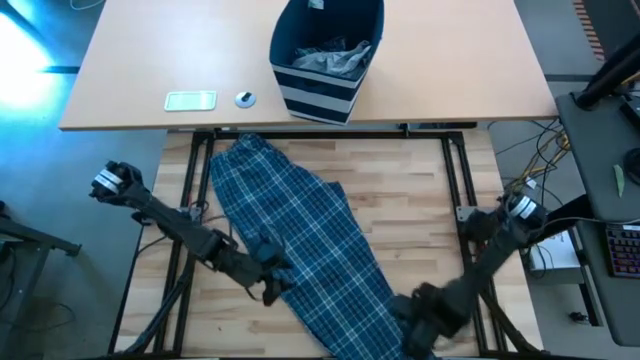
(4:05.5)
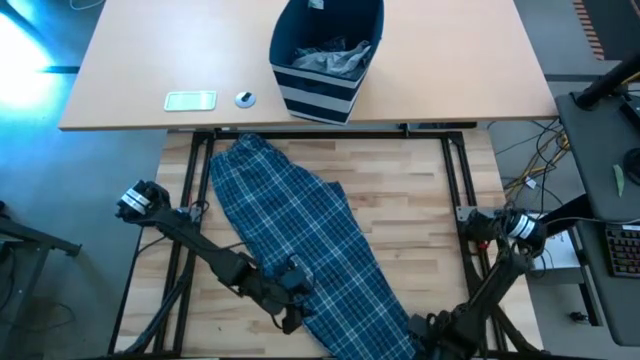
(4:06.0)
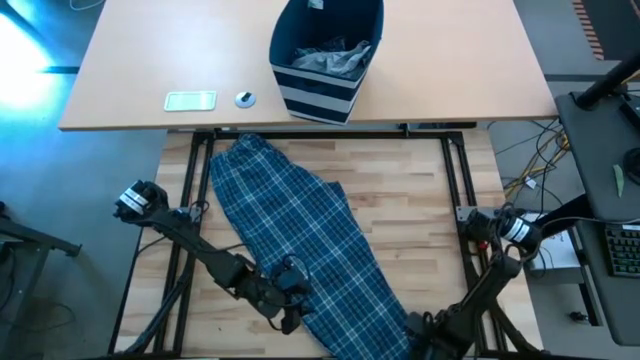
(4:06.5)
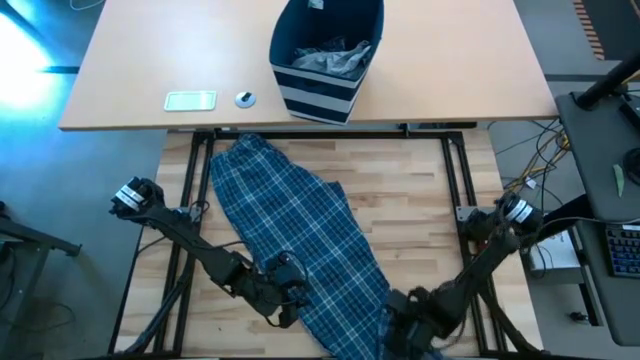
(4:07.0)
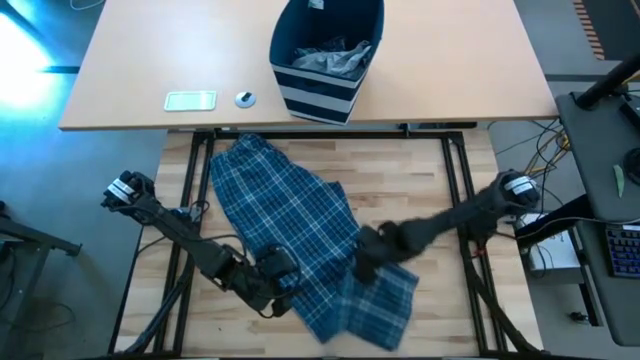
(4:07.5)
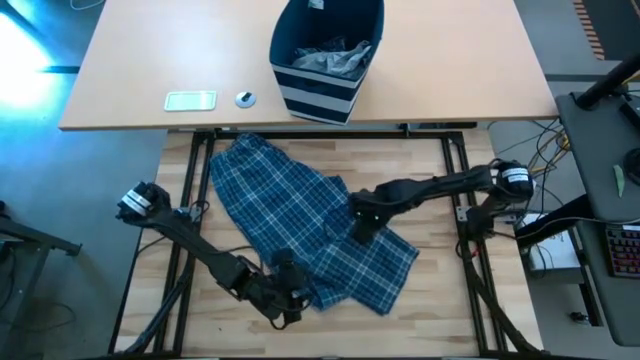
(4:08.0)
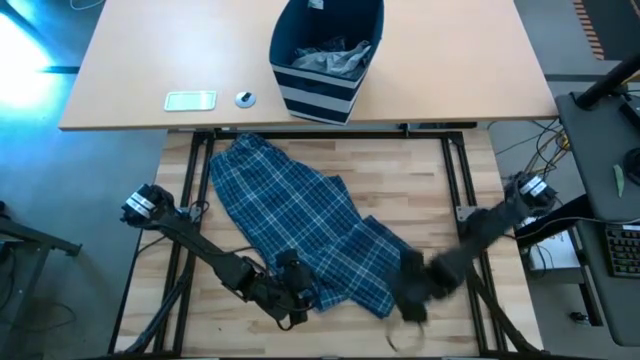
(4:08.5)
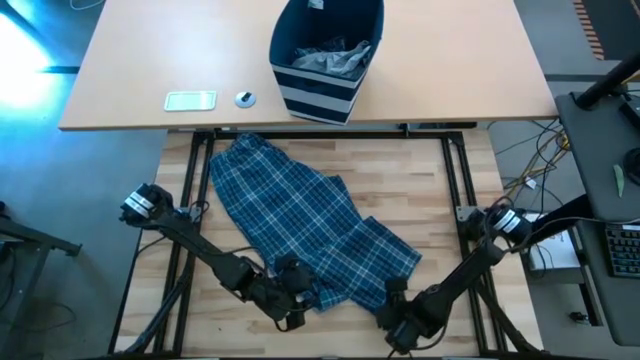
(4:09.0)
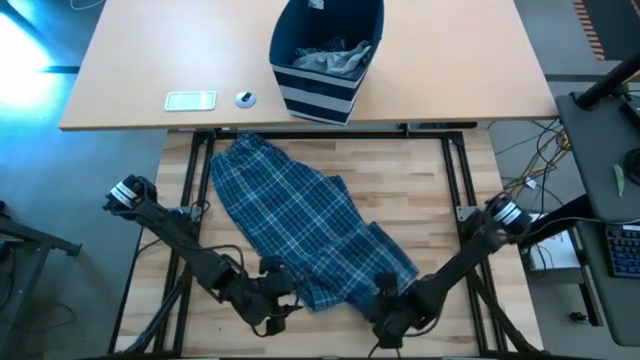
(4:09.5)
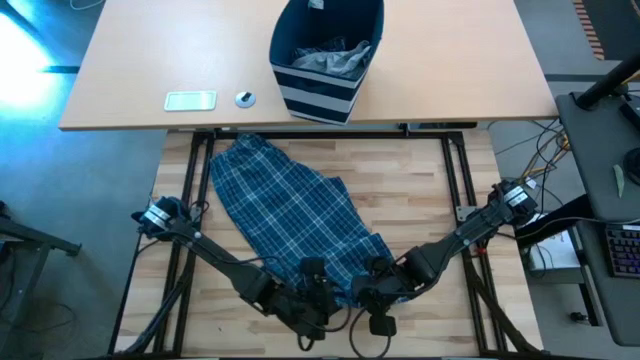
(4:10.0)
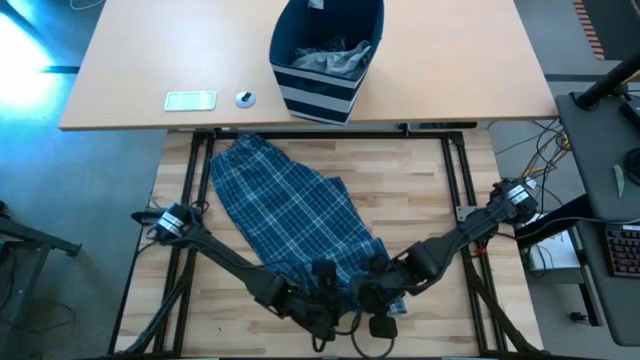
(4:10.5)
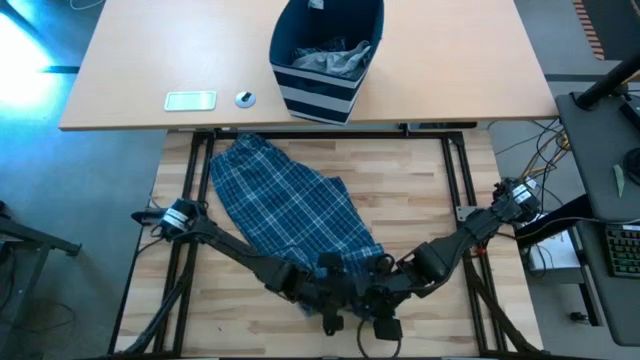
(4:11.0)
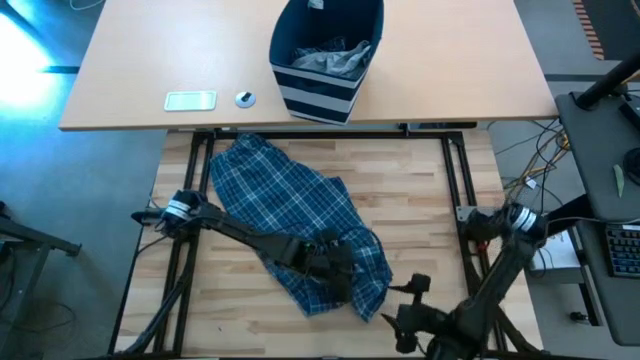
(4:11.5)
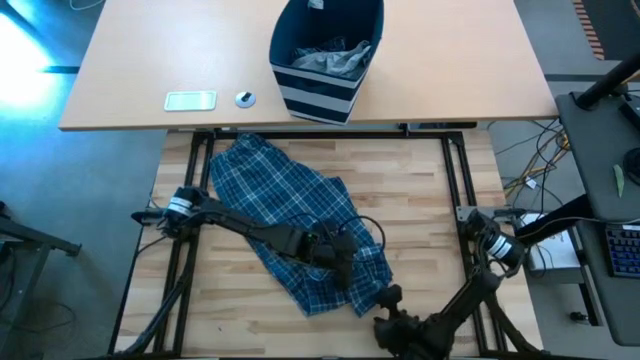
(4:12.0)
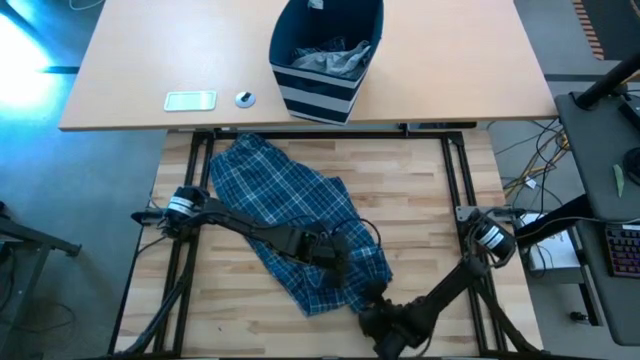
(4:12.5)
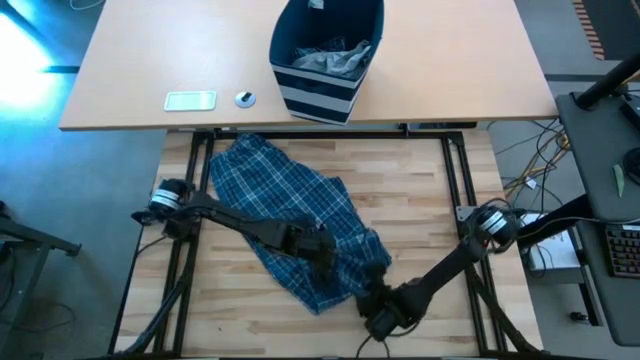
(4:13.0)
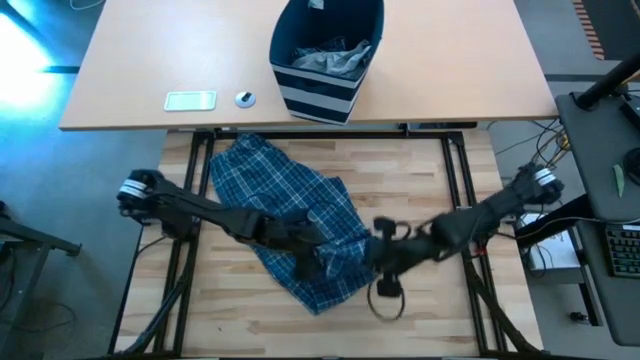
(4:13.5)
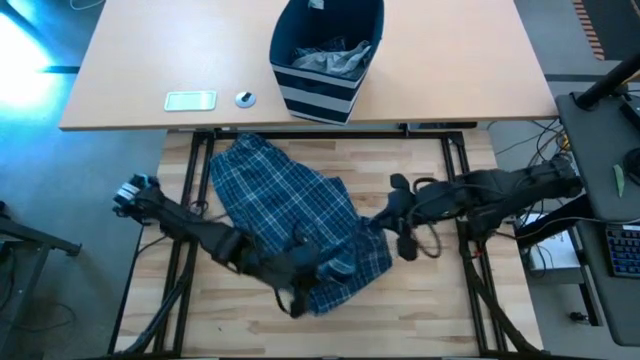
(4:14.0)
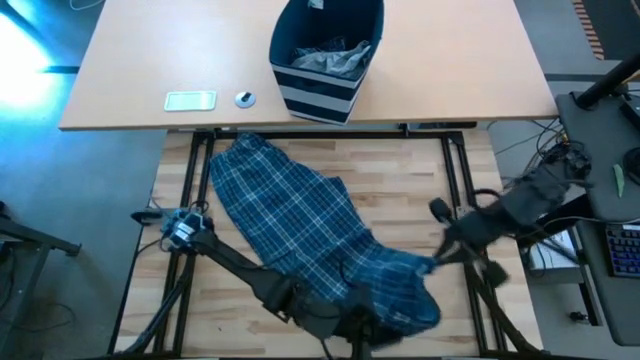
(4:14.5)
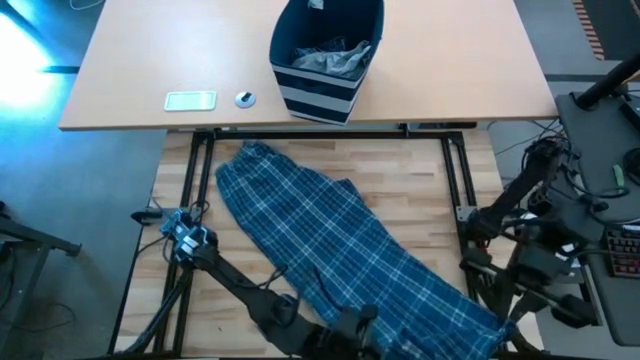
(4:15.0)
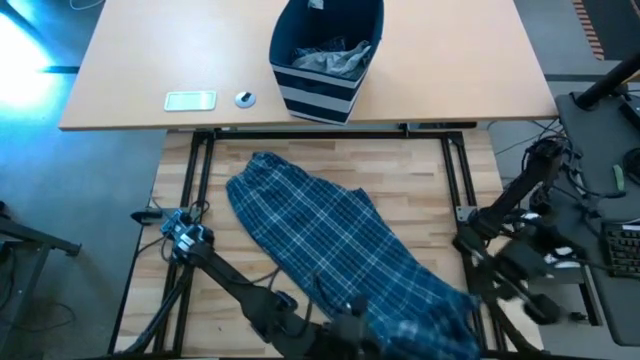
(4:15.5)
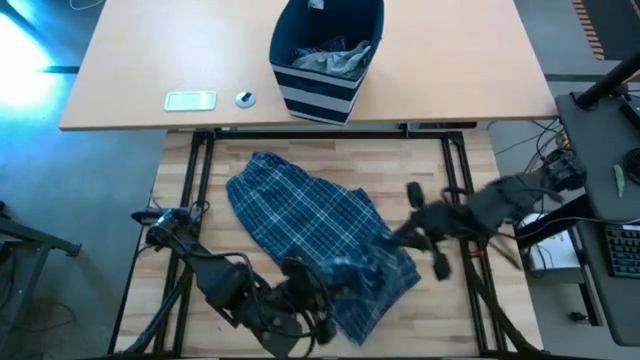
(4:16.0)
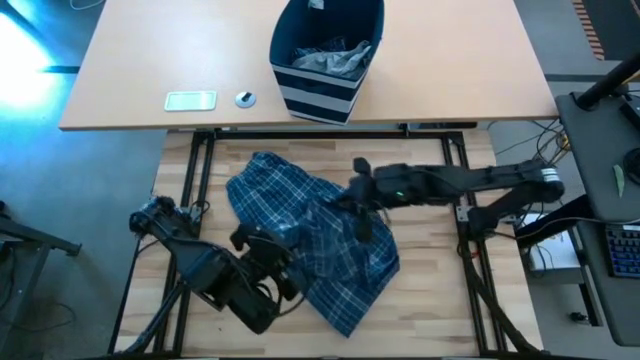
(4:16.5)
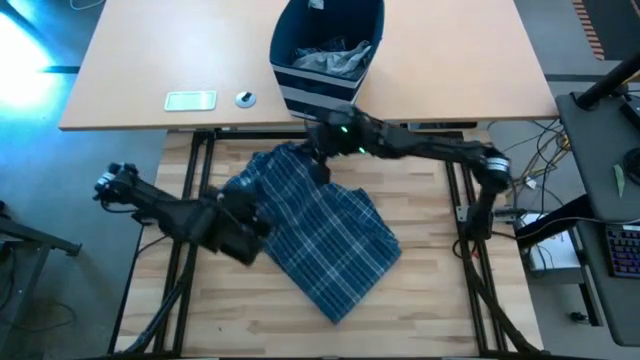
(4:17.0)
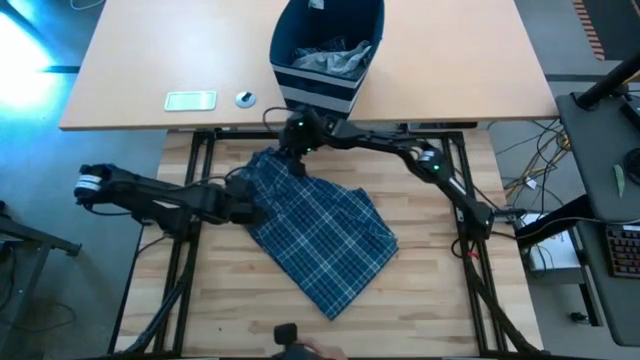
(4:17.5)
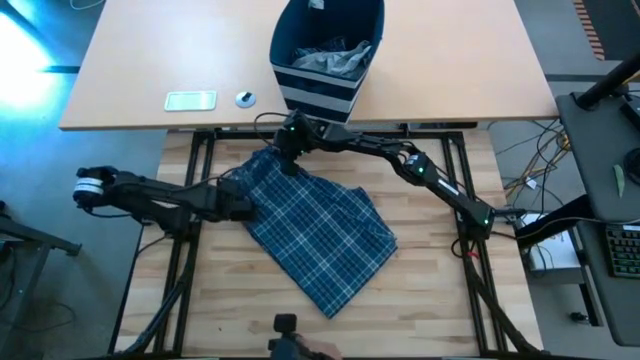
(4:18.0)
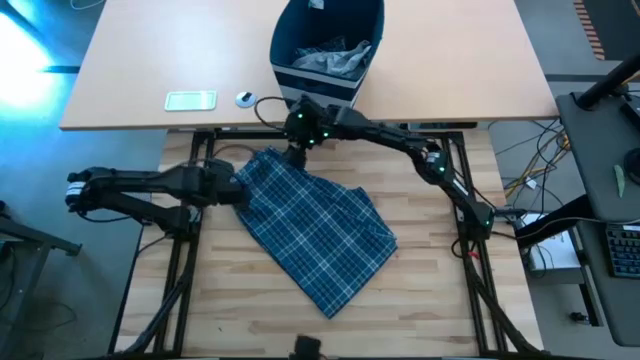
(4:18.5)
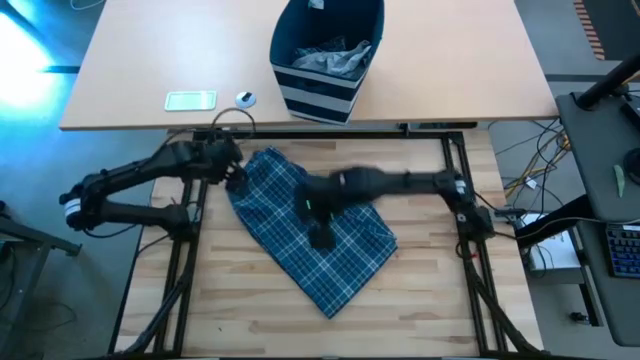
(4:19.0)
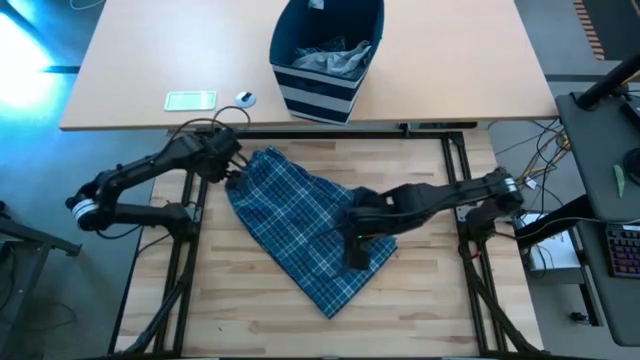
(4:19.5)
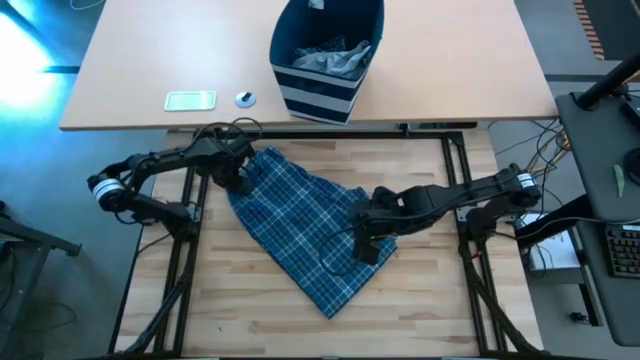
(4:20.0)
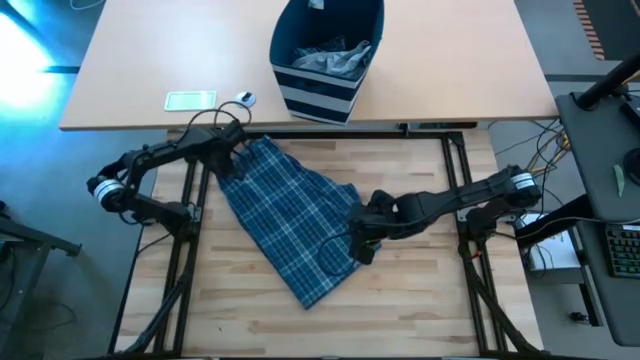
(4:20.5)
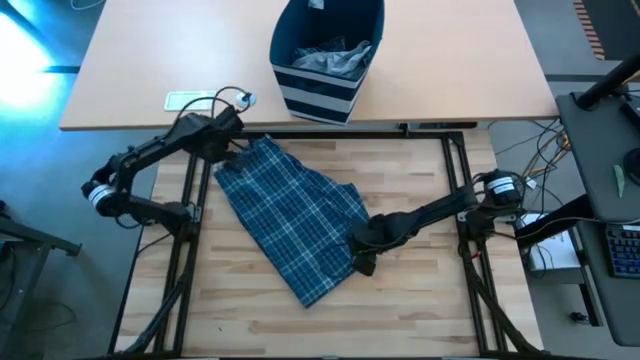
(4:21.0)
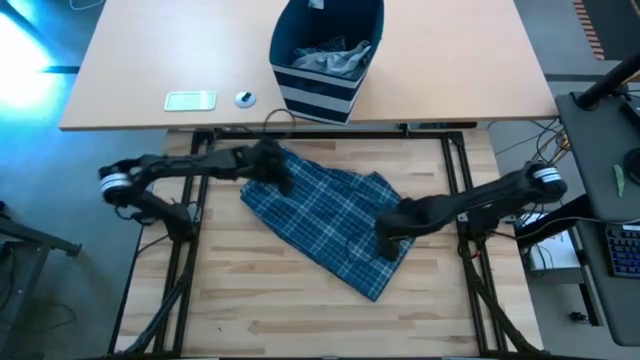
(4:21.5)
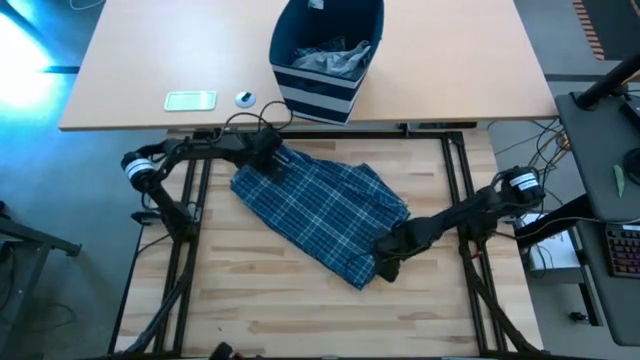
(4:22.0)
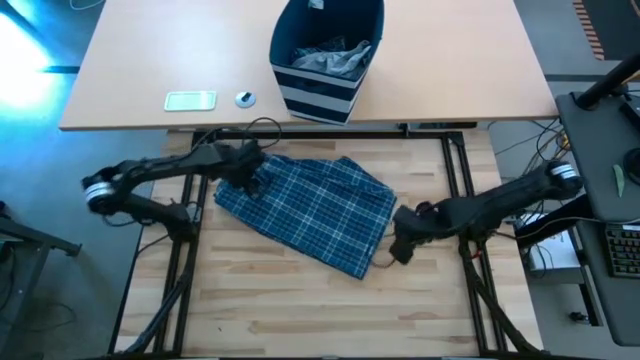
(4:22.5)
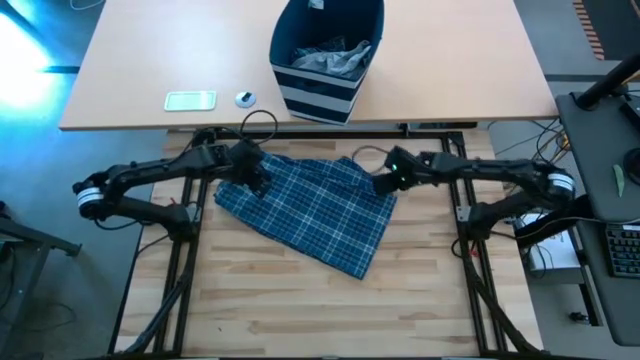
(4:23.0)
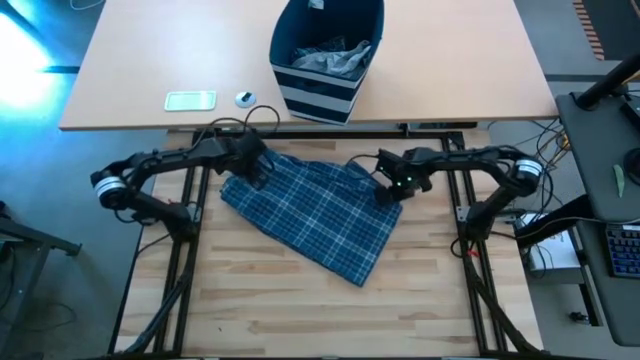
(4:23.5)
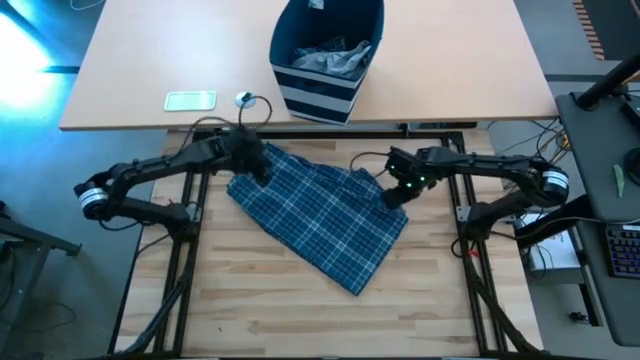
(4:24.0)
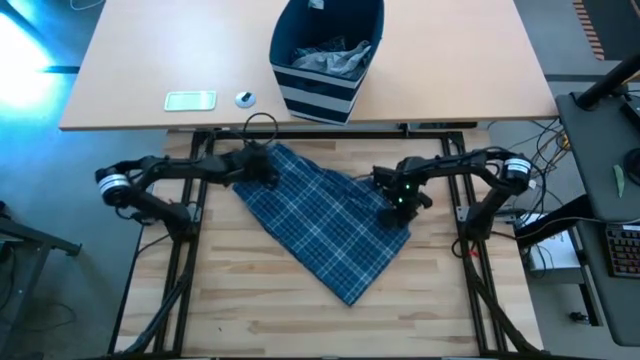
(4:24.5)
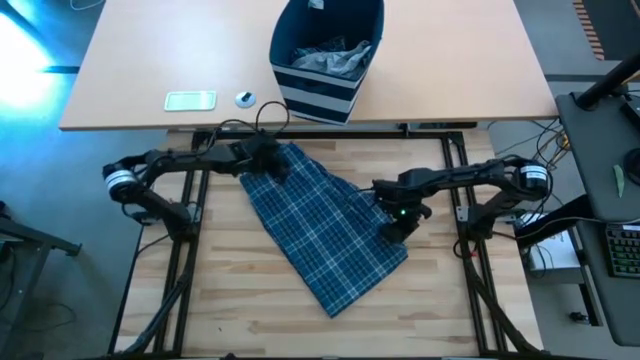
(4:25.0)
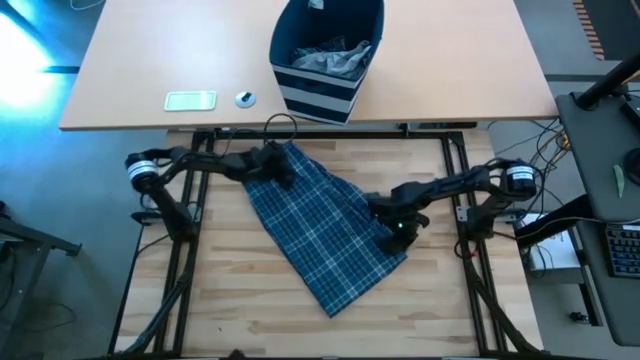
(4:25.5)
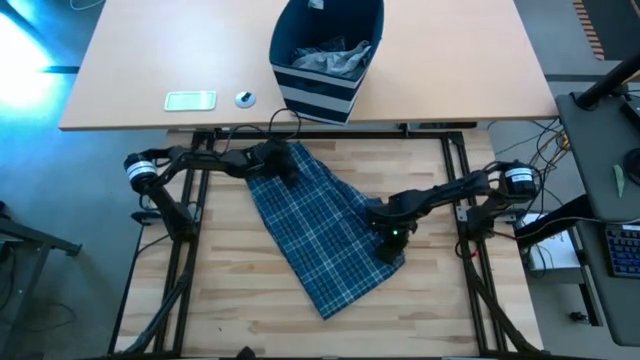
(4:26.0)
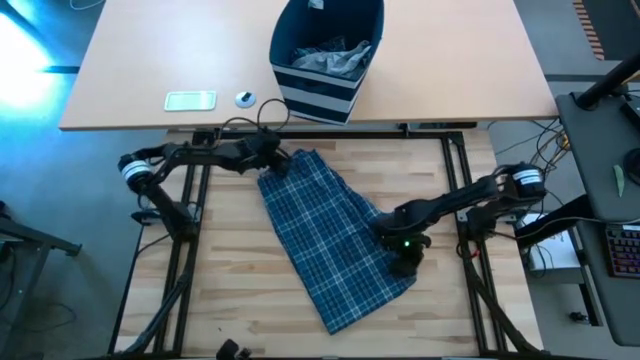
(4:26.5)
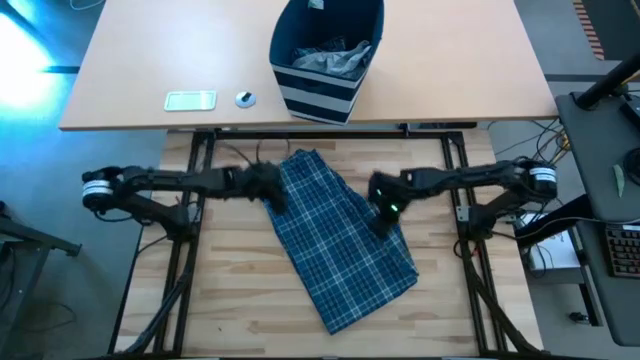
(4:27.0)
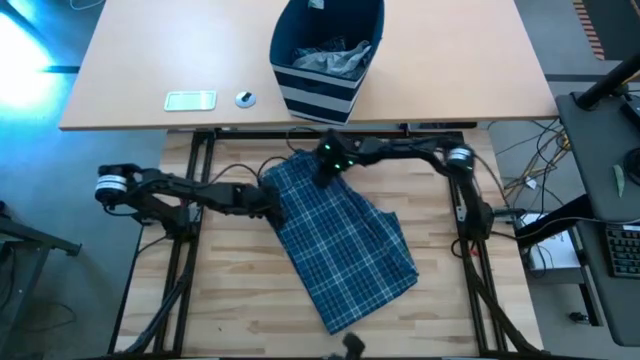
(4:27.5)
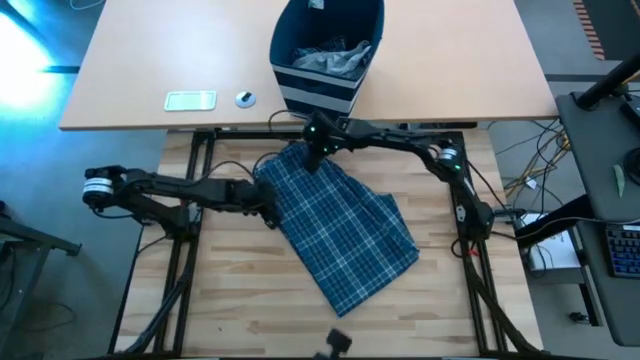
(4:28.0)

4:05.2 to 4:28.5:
Task: Fold Laundry from Bin
Fold the blue patterned pants
